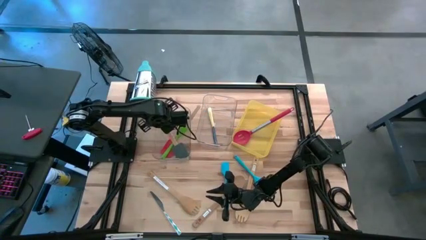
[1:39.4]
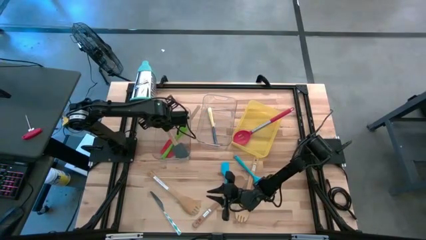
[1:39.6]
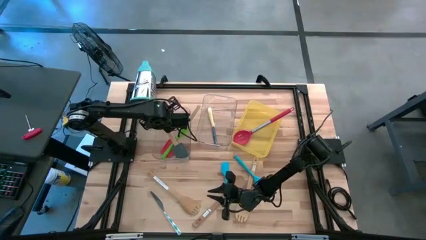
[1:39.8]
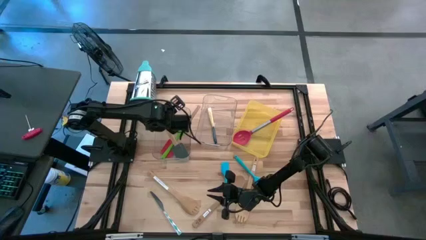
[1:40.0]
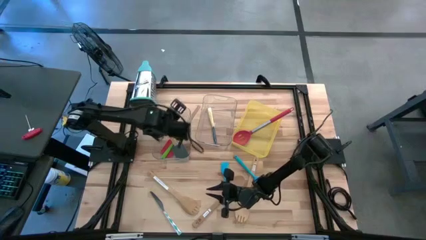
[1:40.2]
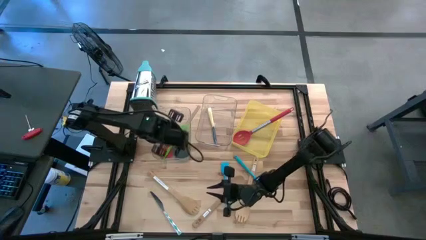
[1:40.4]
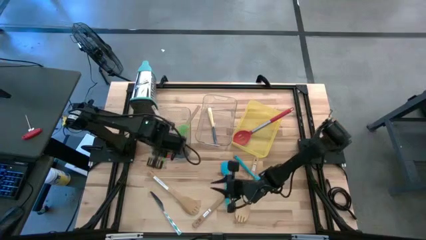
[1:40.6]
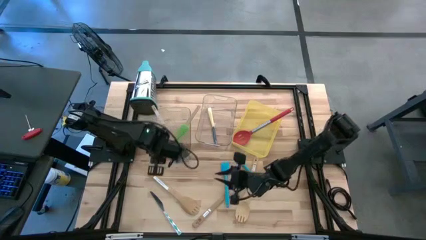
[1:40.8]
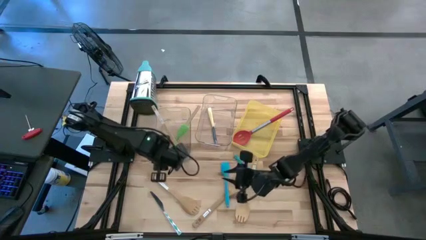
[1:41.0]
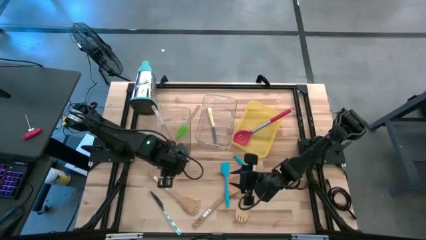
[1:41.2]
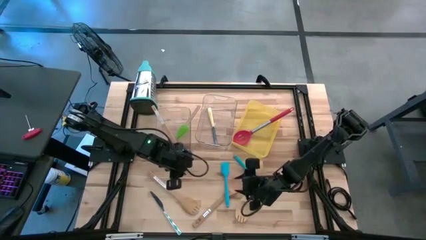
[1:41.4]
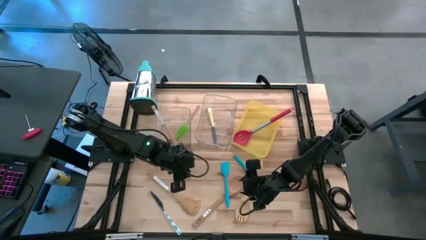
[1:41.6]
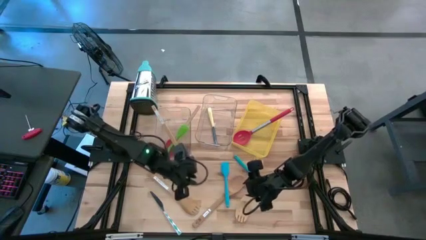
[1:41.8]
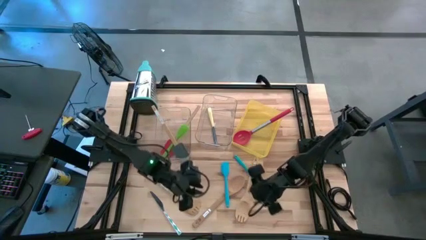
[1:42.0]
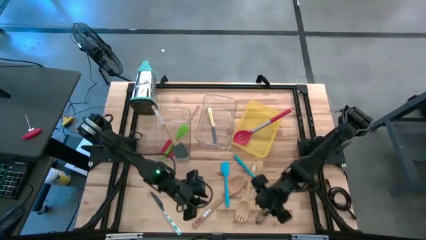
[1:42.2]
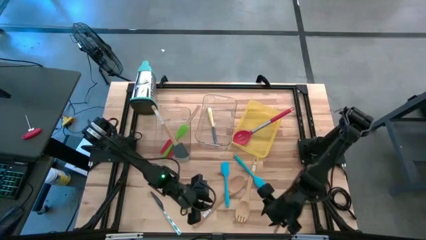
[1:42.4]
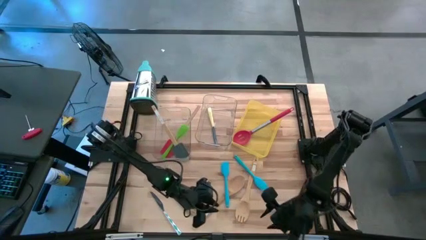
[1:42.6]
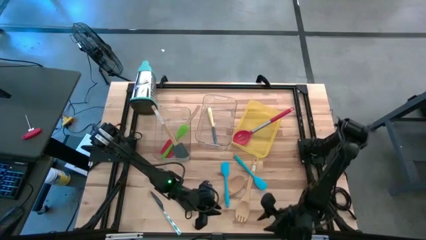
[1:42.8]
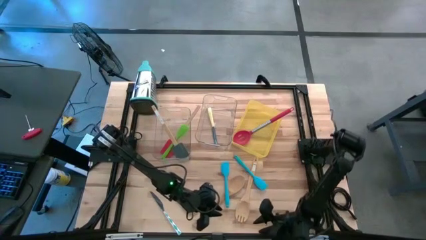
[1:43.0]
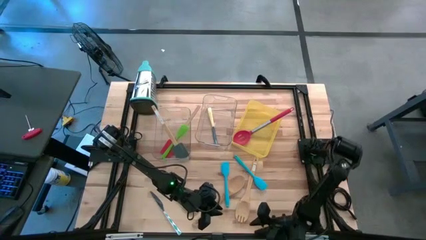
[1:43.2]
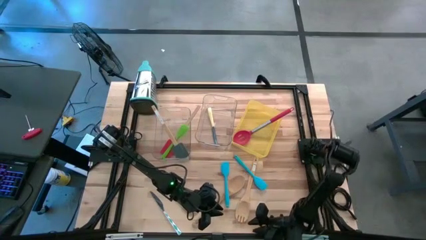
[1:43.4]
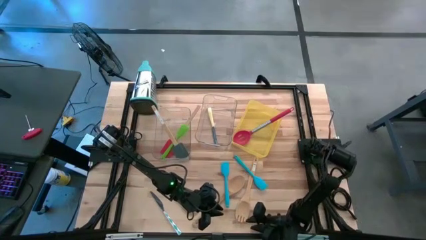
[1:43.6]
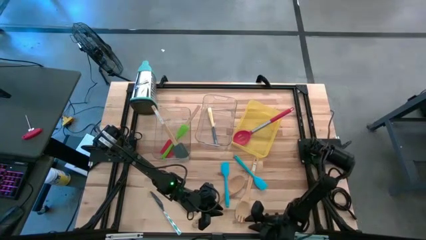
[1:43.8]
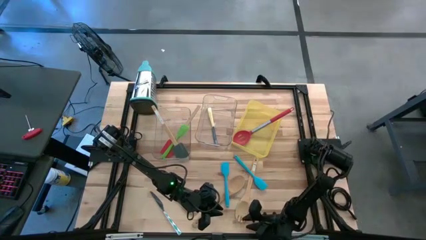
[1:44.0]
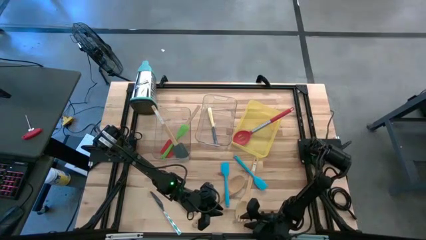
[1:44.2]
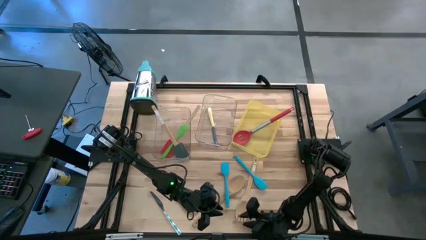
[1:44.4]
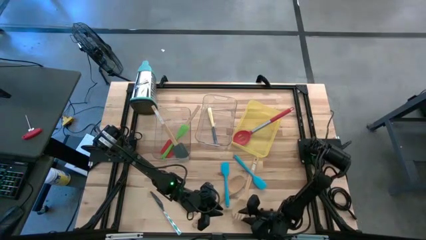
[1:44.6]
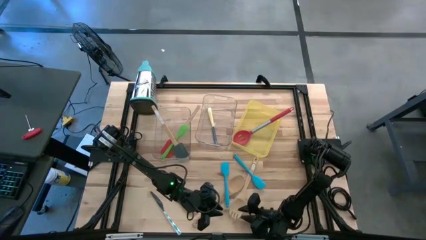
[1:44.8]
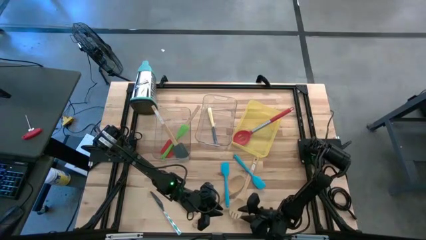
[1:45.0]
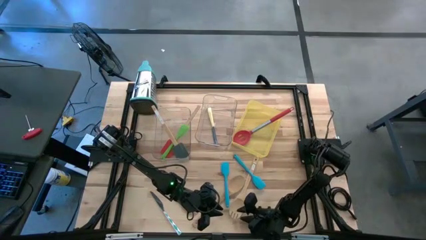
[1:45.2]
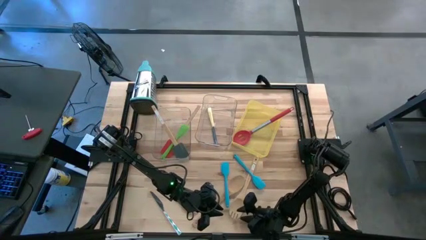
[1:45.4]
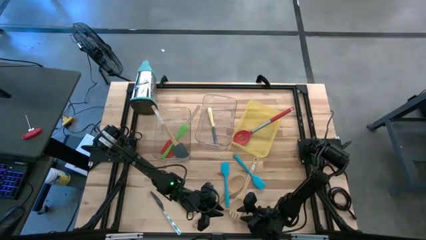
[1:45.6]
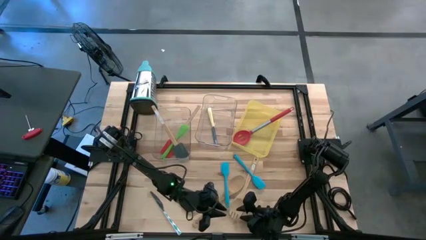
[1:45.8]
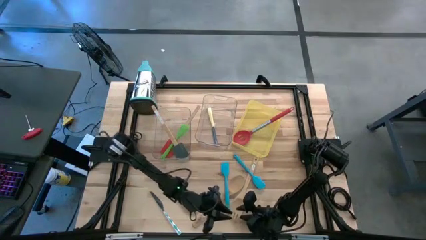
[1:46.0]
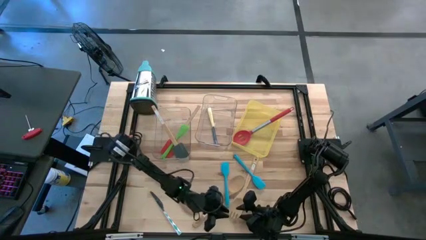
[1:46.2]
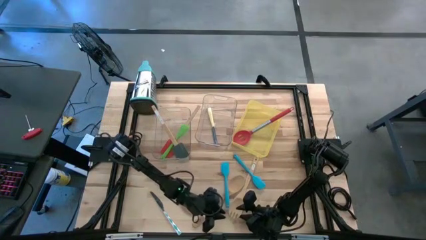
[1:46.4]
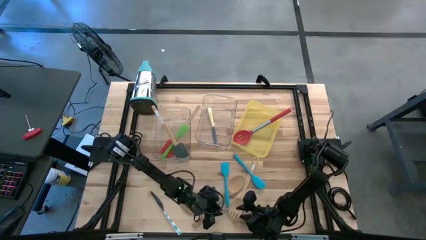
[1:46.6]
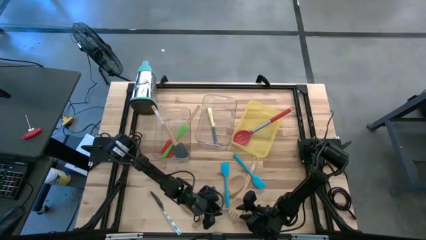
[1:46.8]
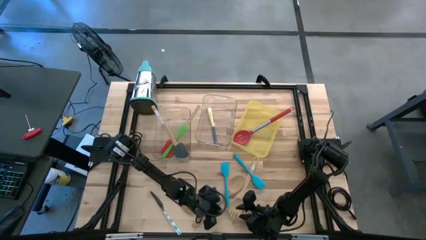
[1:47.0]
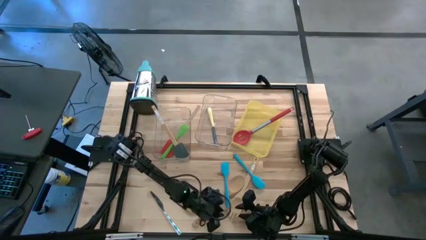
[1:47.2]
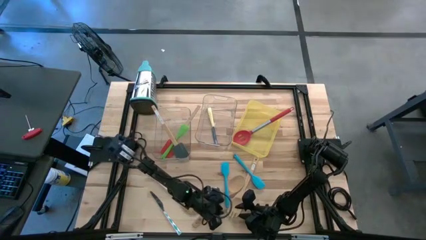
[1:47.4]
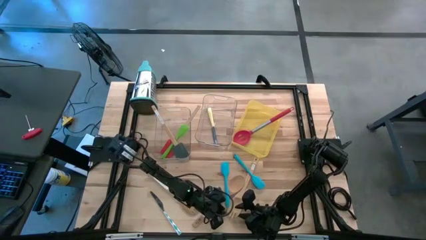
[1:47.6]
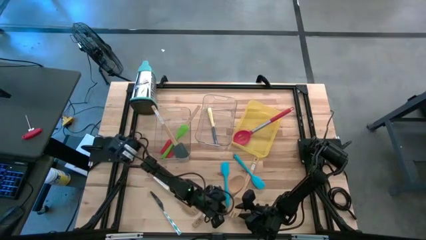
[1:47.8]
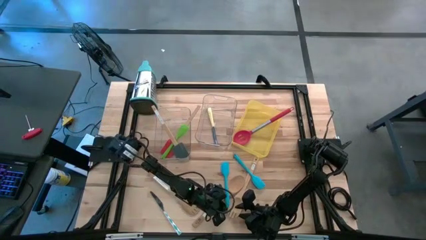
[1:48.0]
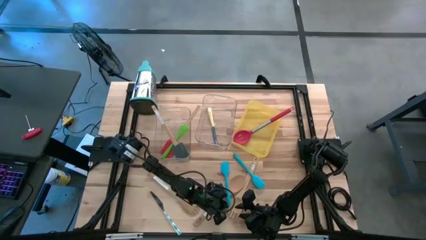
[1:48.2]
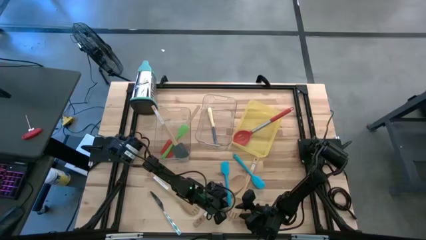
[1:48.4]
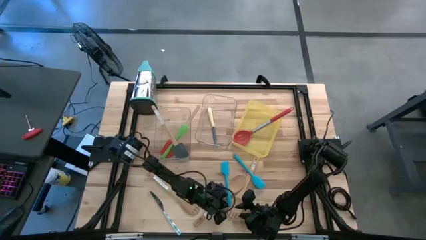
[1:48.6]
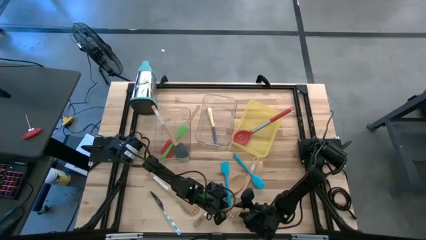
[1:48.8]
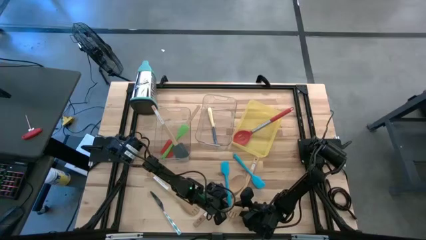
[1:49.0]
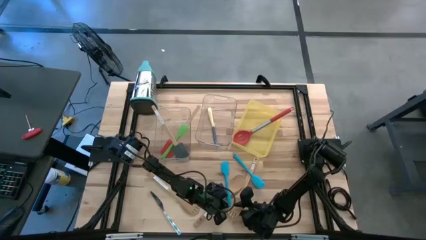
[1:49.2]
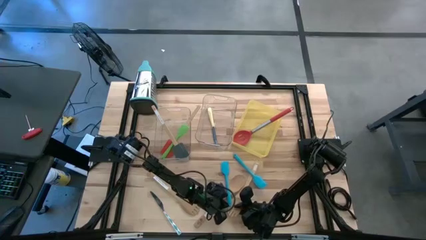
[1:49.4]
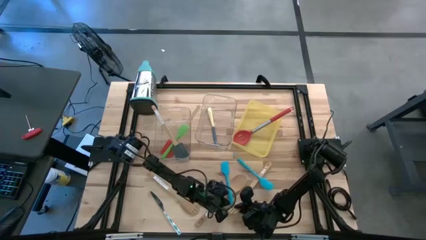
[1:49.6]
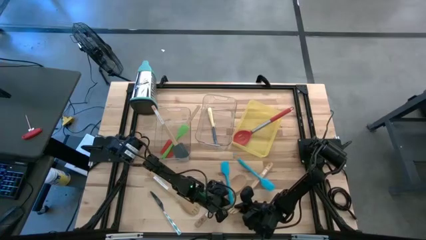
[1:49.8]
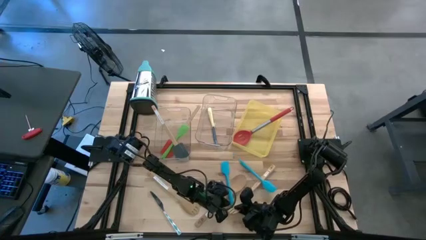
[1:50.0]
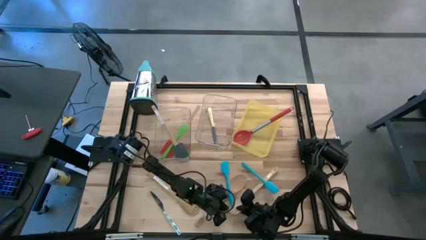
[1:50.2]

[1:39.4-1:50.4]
Task: Pick & Place Kitchen Items
Put the brown serving spork into the yellow bin
